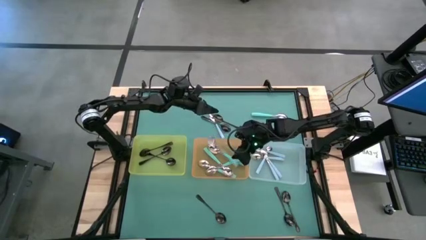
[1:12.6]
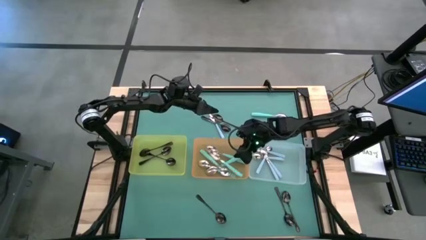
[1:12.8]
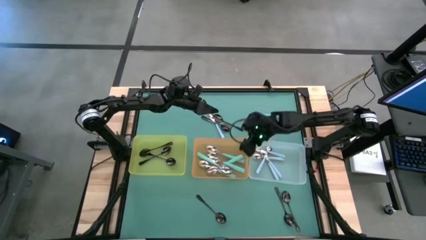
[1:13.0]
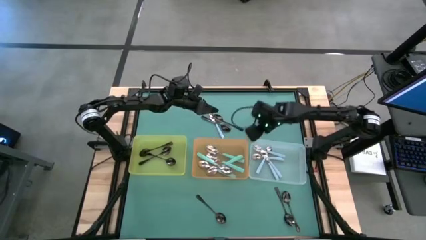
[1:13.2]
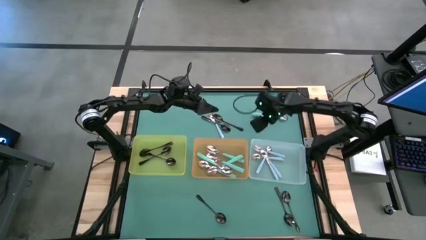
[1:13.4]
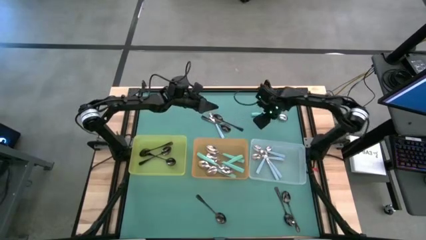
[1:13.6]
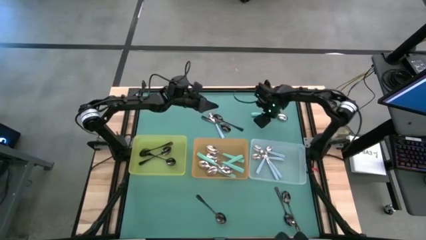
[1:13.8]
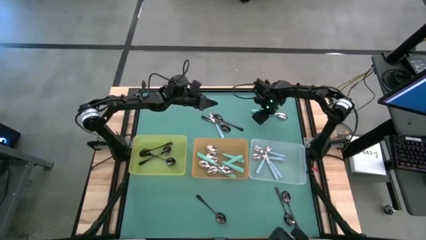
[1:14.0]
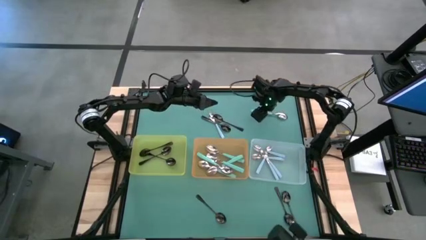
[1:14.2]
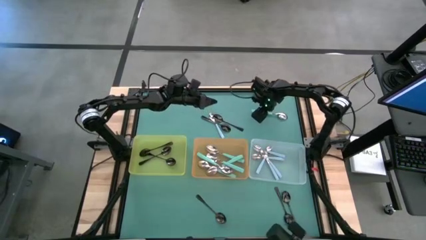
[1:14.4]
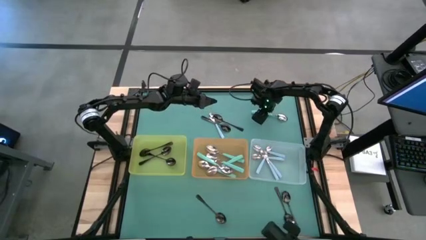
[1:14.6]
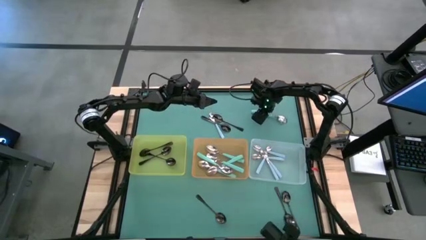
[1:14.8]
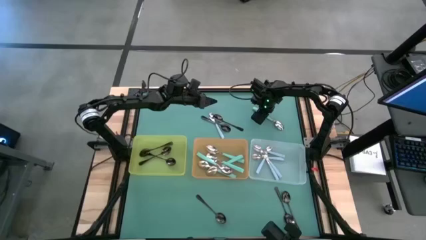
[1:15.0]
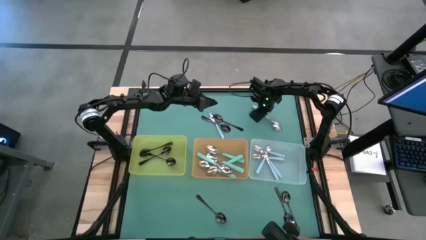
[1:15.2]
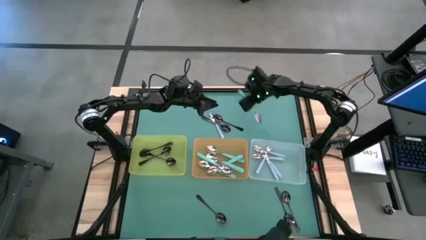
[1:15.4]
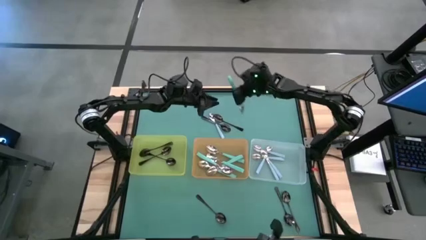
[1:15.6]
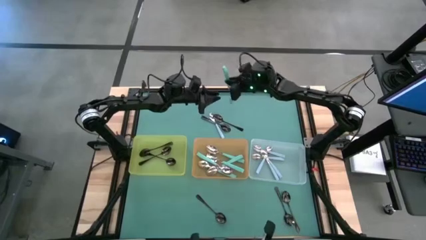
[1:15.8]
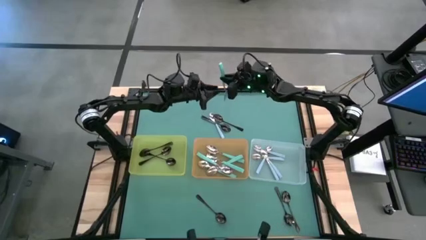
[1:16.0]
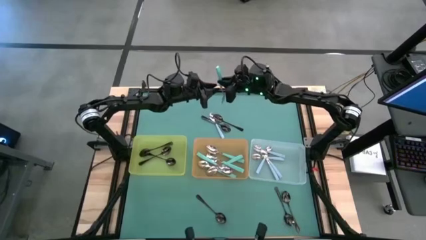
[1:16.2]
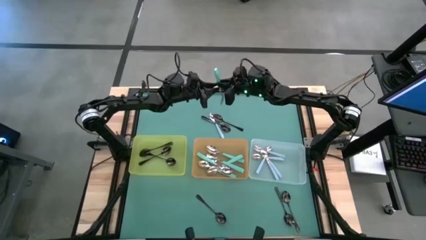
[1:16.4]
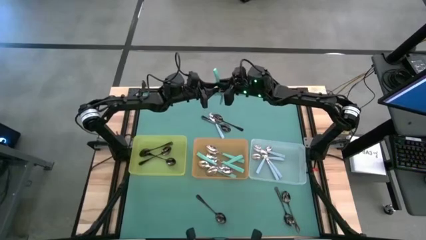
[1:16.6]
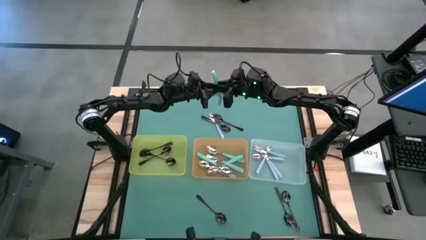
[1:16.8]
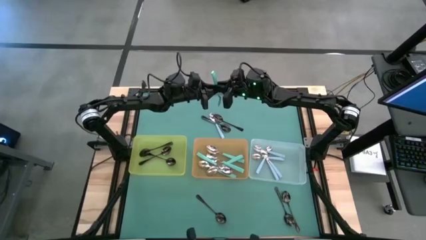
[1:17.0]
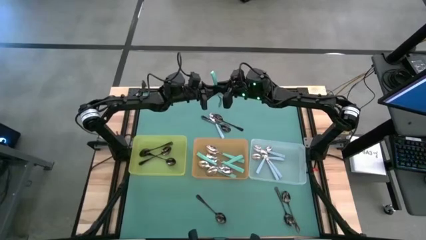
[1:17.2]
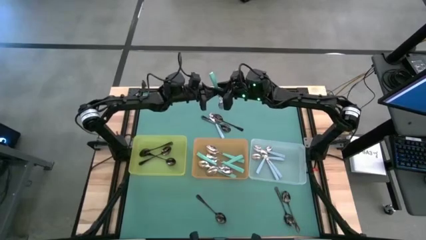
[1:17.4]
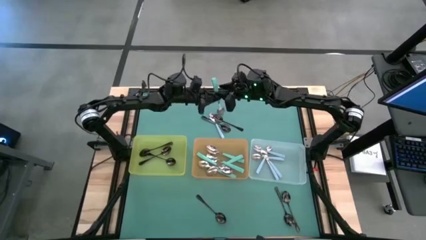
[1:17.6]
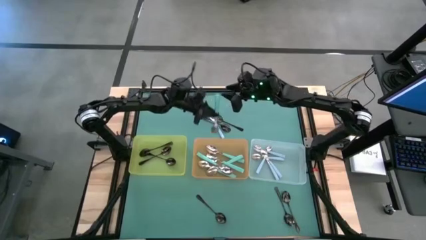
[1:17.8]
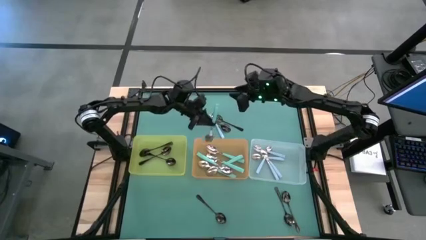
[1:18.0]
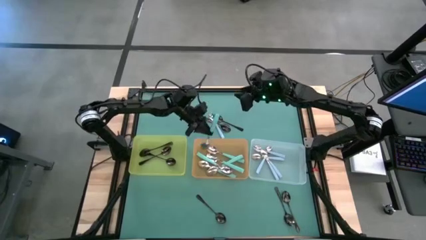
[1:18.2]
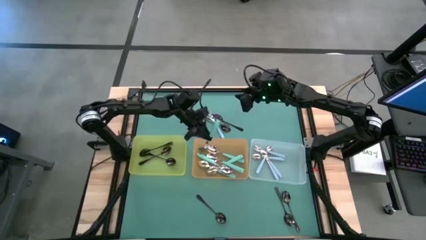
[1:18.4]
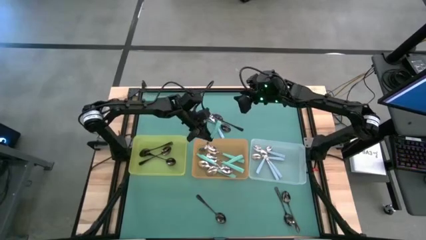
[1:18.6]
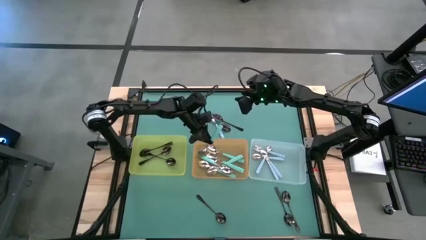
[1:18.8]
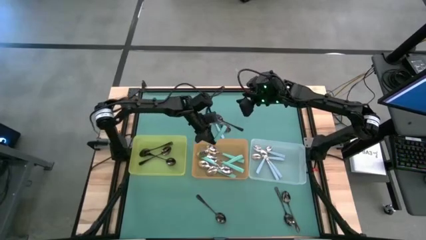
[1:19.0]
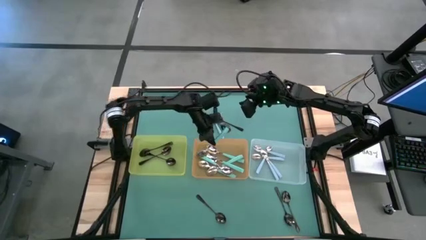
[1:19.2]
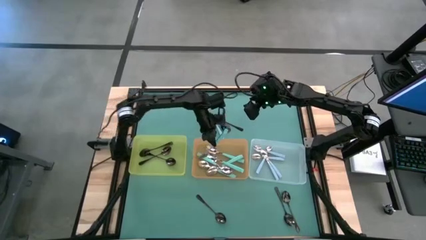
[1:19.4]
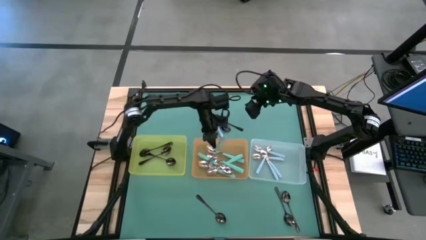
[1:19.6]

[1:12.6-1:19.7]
Task: Sort silverware by color (type)
Put the green spoon into the orange bin

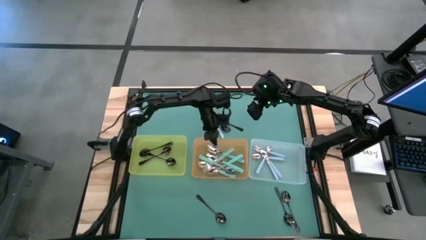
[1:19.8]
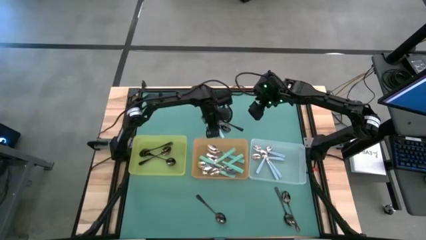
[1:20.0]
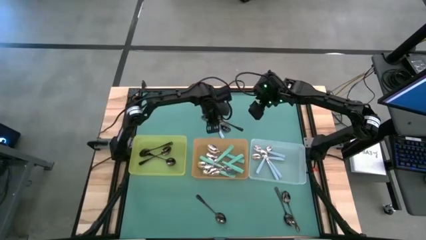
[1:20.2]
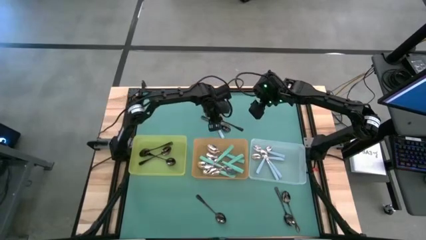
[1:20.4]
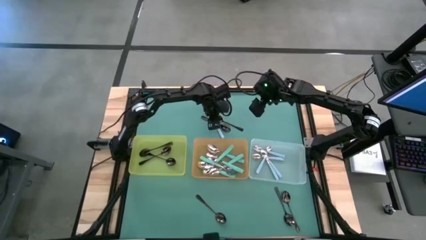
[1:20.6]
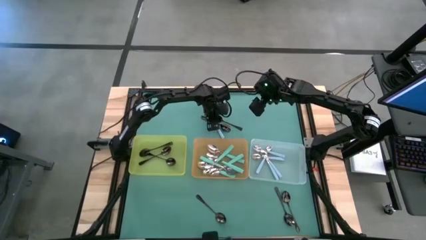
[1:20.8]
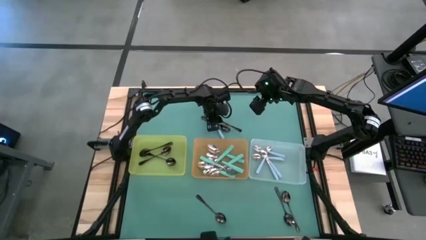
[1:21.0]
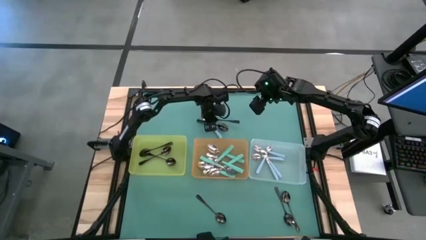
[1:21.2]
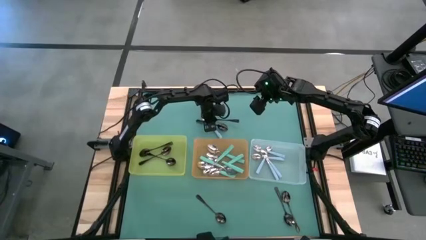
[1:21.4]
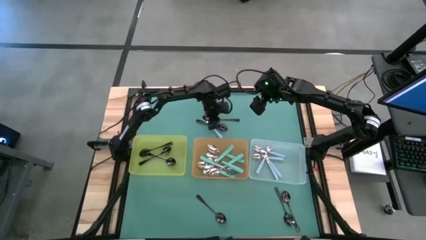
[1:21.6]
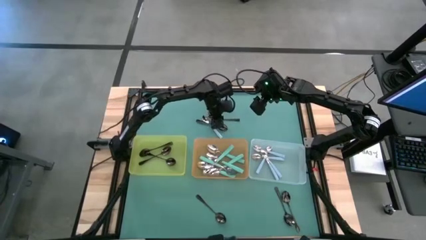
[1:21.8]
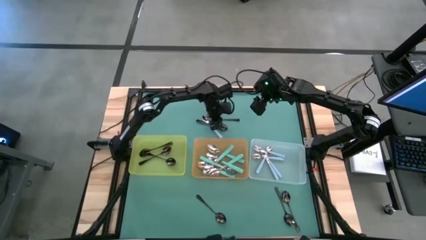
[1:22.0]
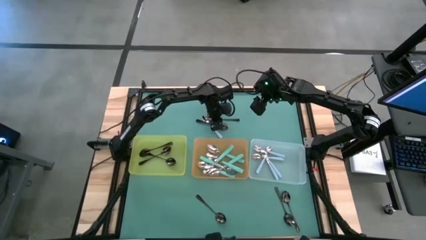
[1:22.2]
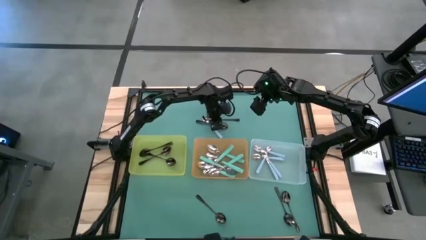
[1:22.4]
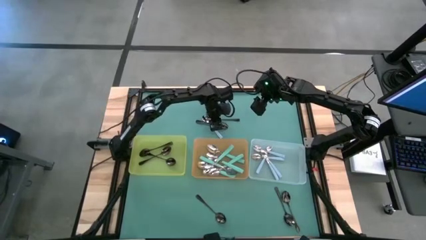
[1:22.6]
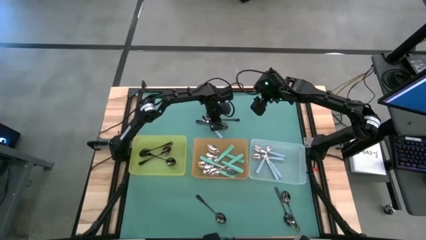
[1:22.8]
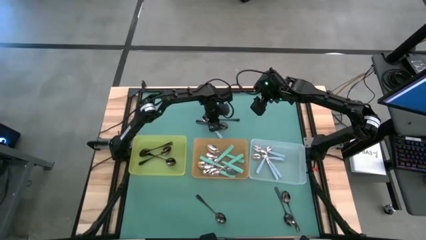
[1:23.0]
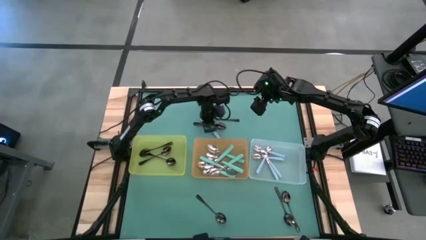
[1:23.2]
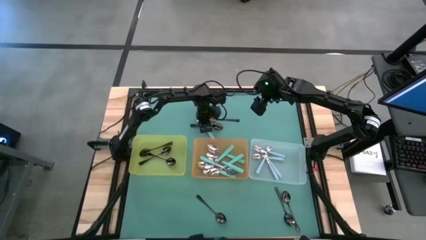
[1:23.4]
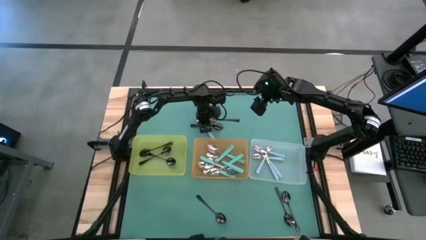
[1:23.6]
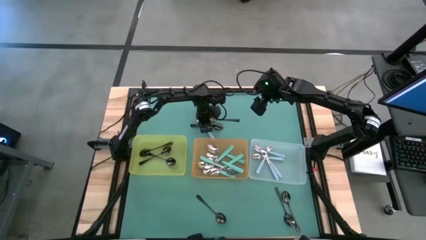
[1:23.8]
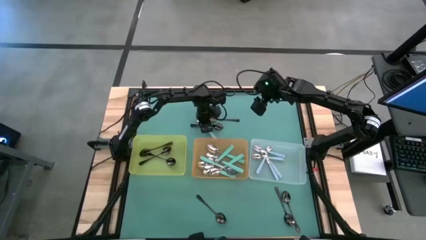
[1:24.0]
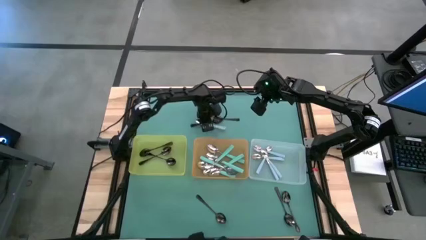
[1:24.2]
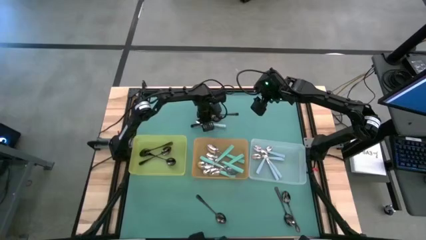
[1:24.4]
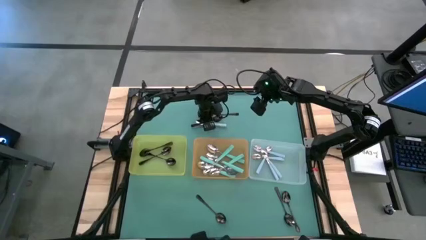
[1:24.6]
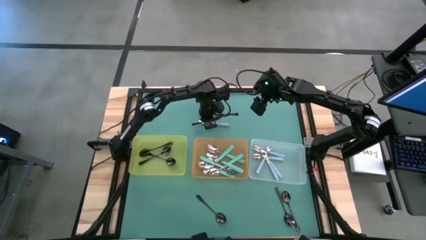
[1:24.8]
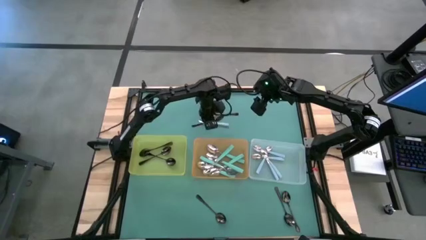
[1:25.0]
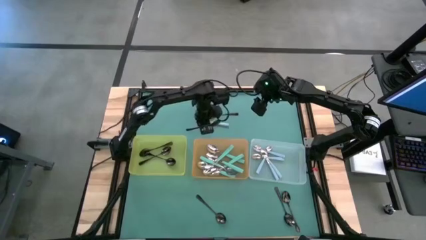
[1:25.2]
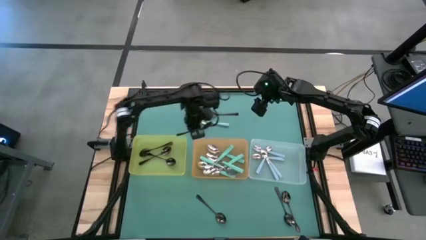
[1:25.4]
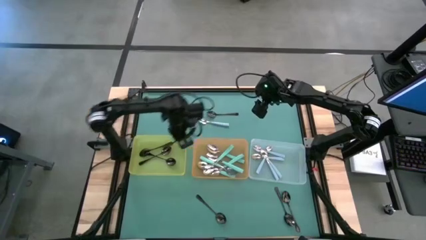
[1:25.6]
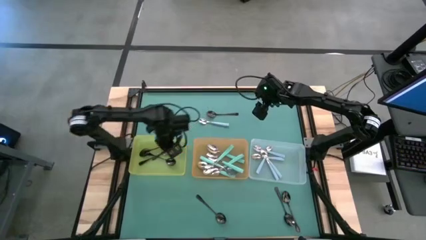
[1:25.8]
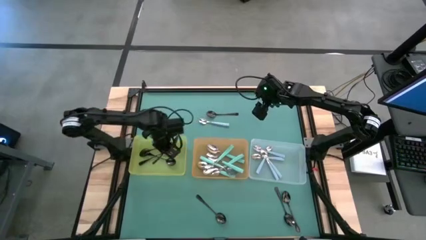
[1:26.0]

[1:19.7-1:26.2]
Put the black spoon into the yellow bin

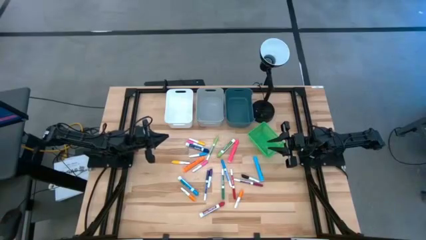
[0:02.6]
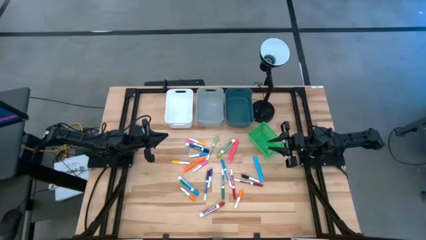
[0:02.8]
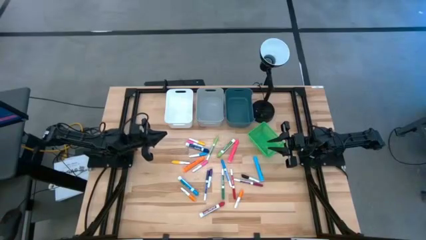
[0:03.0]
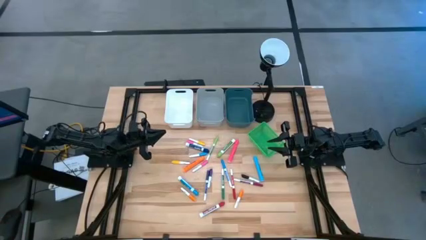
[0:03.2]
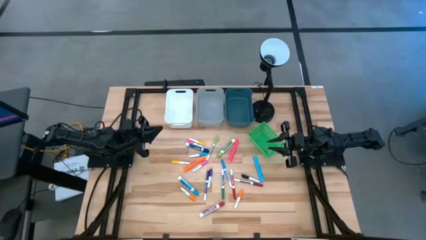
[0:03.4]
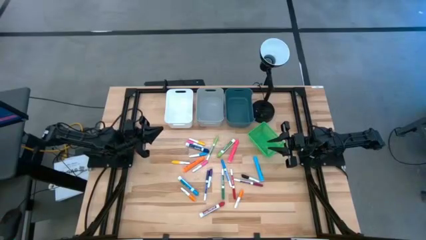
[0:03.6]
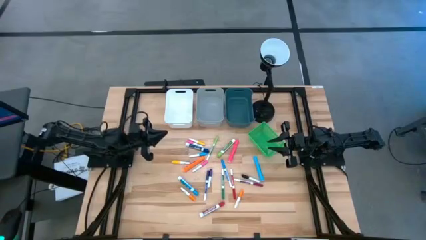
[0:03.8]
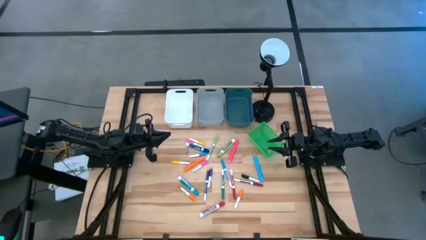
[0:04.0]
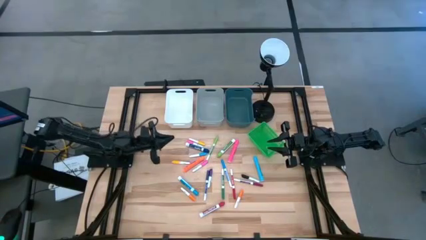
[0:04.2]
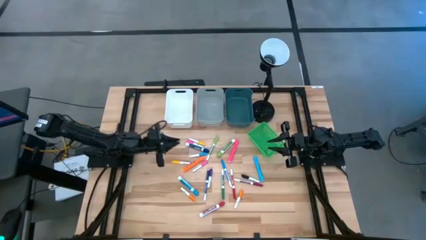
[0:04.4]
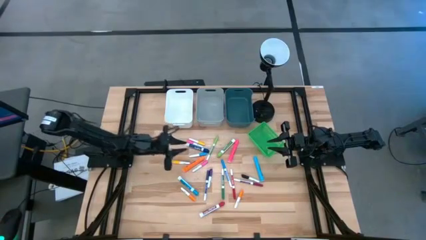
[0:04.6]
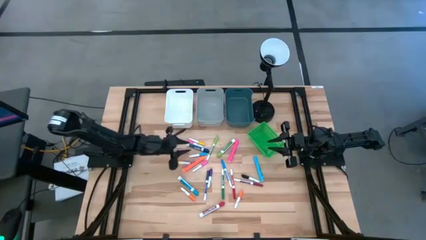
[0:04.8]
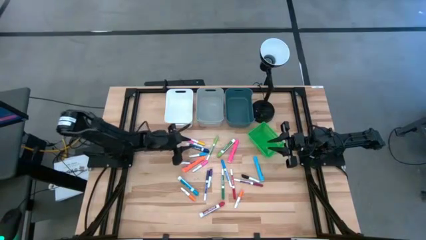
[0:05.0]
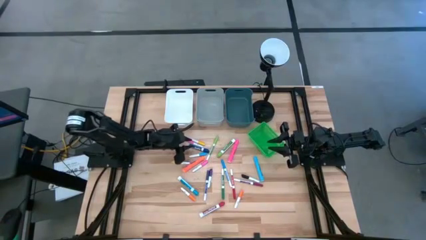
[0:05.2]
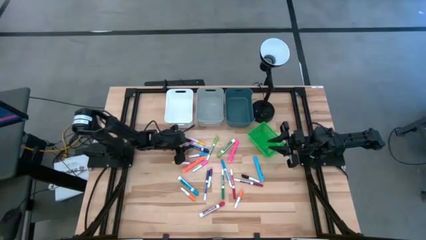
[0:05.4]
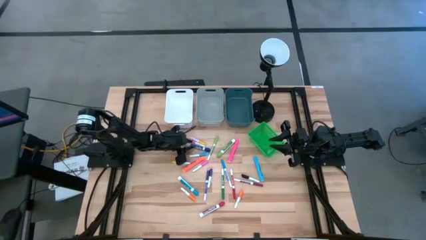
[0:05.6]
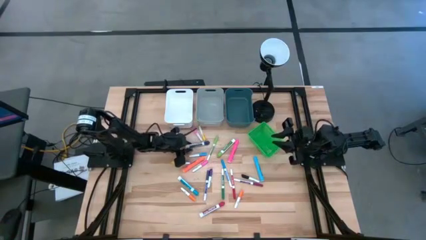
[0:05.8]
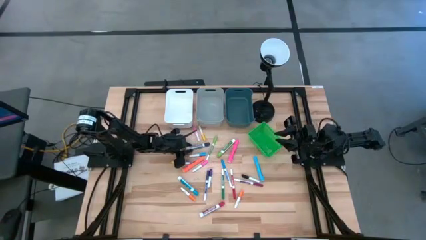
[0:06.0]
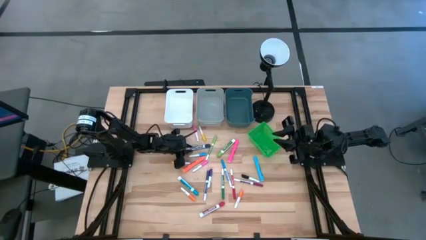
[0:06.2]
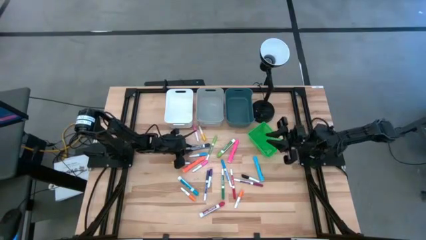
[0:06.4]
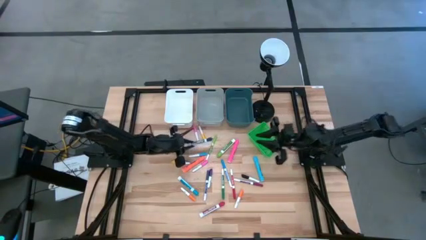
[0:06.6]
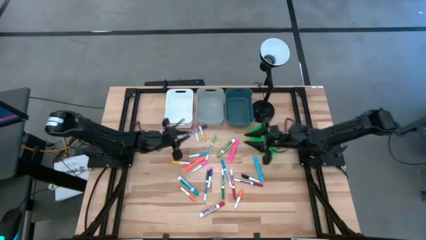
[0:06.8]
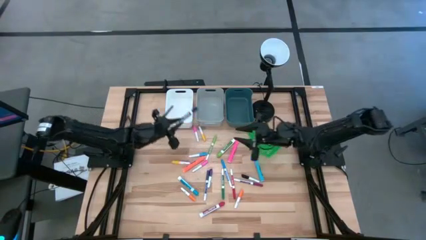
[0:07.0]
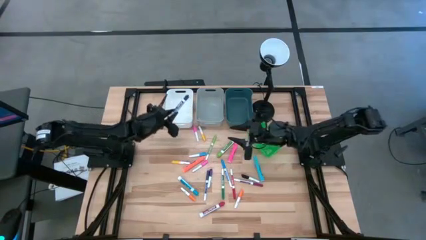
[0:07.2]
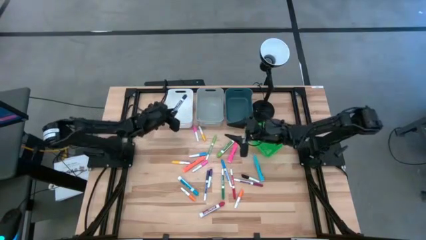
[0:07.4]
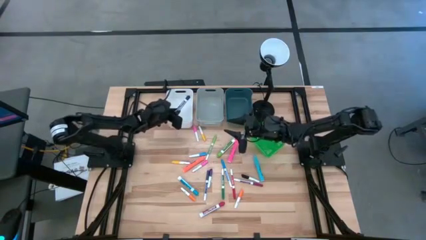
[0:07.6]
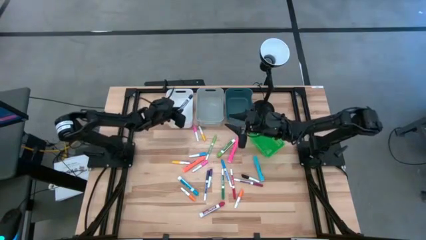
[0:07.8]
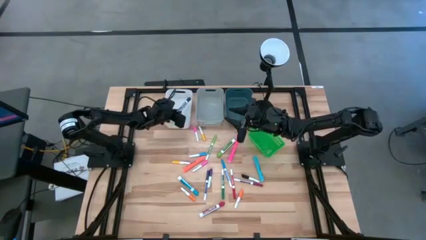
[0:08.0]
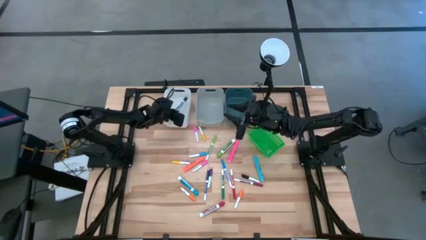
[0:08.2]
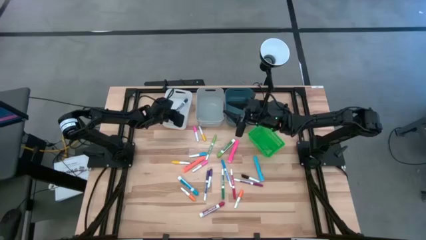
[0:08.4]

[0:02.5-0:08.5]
Task: Pick & Place Markers
Put the blue marker pen into the white bin
